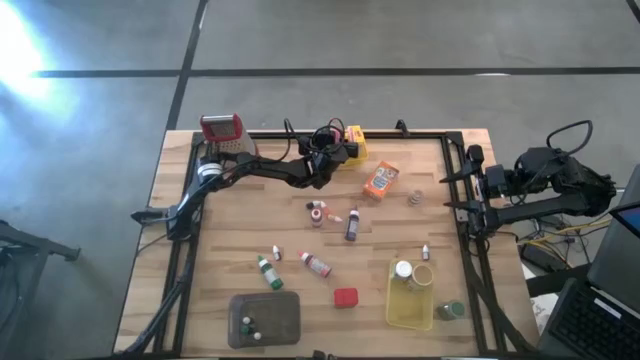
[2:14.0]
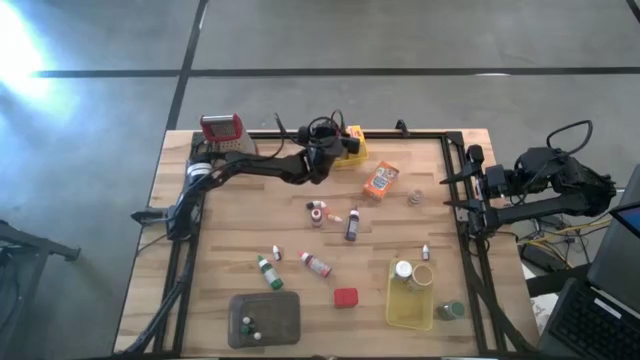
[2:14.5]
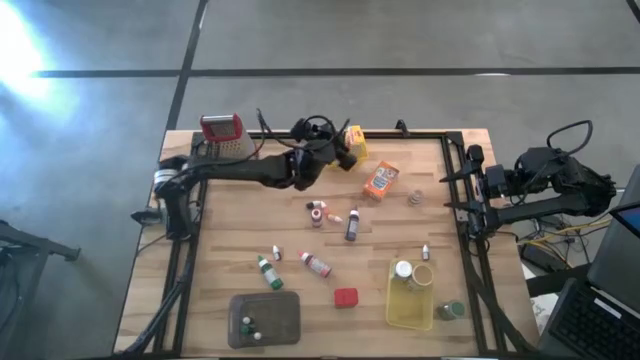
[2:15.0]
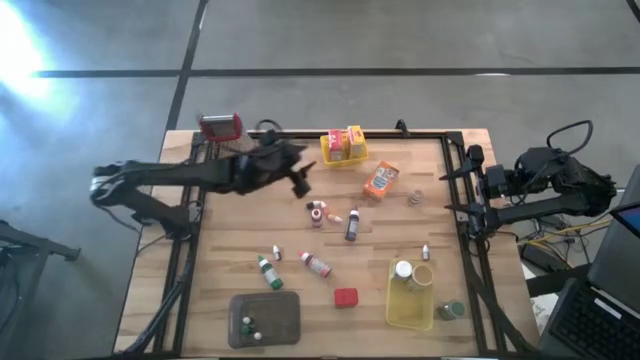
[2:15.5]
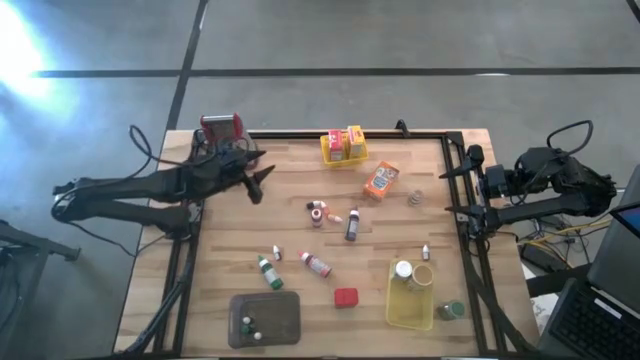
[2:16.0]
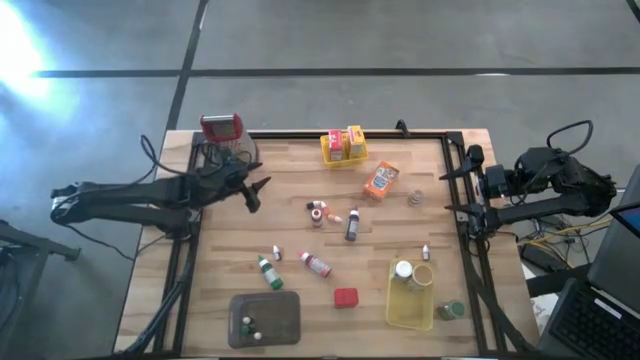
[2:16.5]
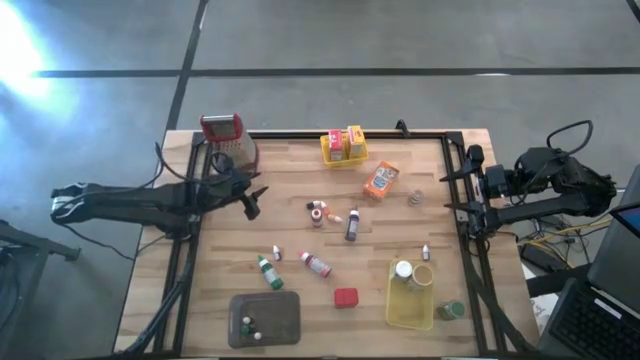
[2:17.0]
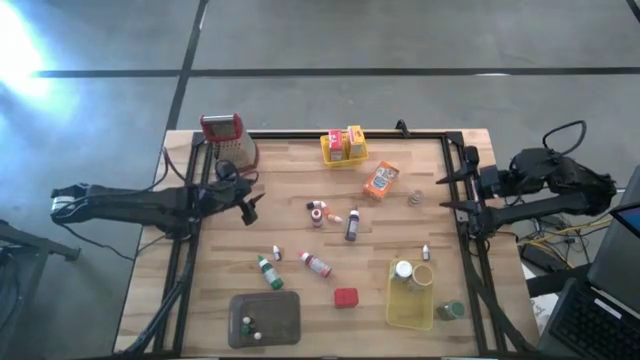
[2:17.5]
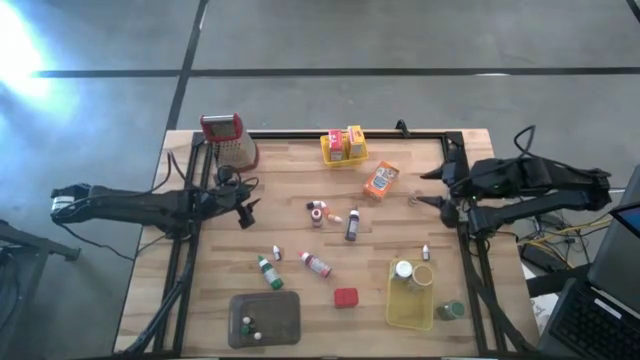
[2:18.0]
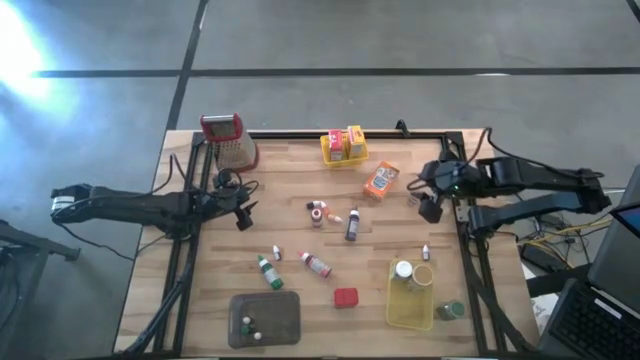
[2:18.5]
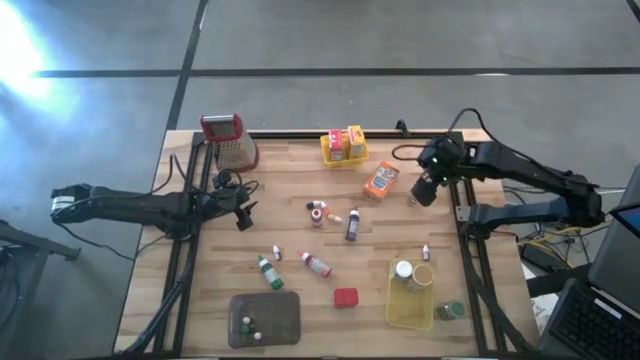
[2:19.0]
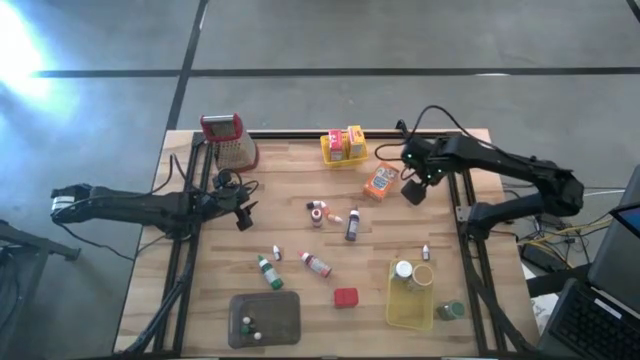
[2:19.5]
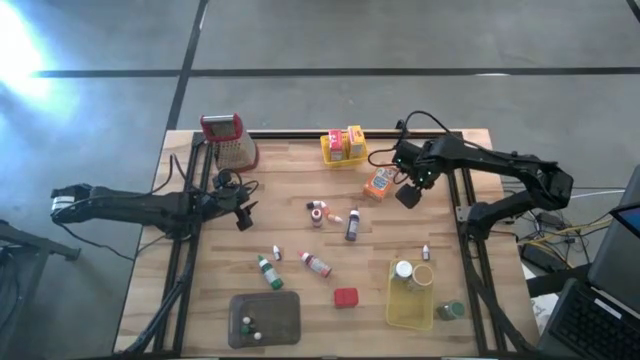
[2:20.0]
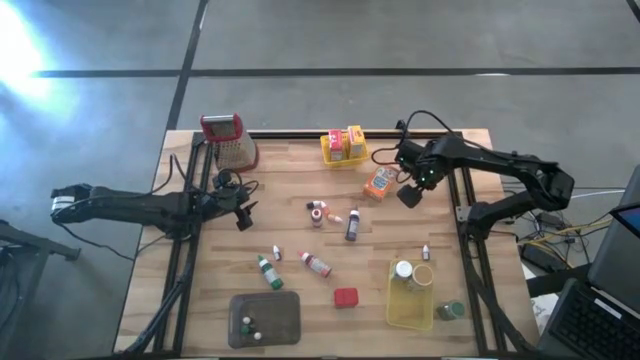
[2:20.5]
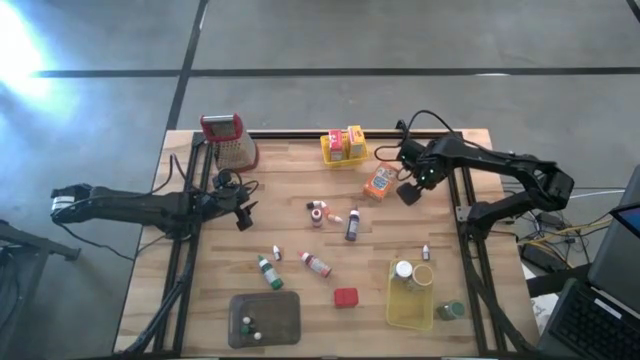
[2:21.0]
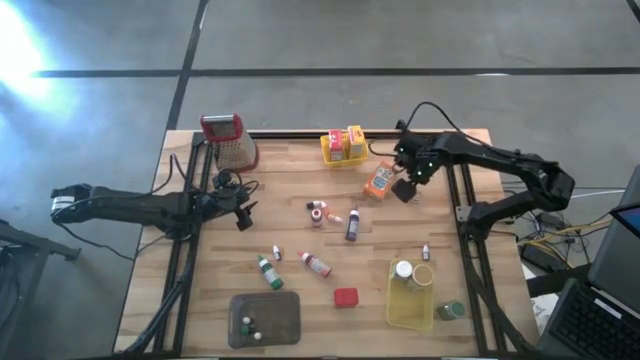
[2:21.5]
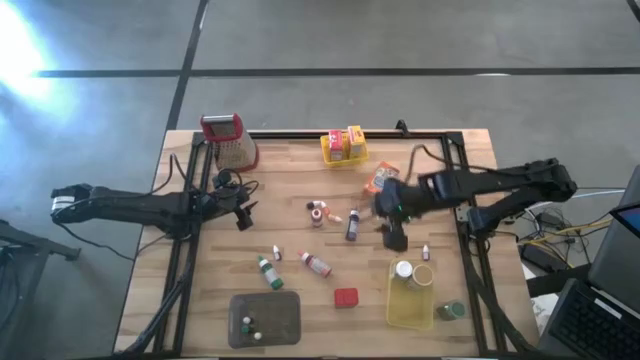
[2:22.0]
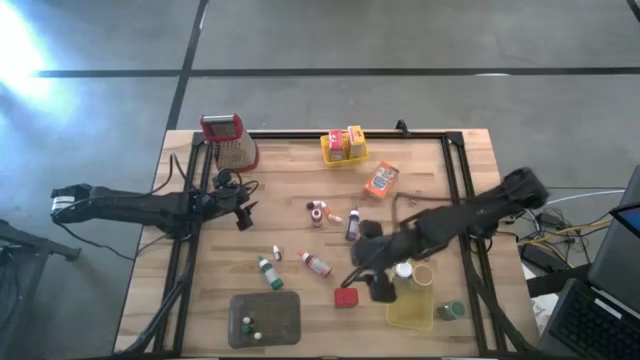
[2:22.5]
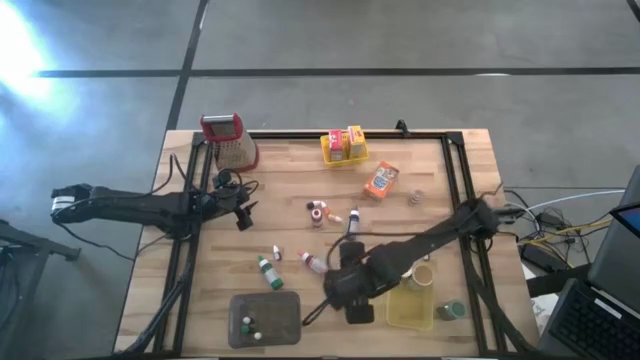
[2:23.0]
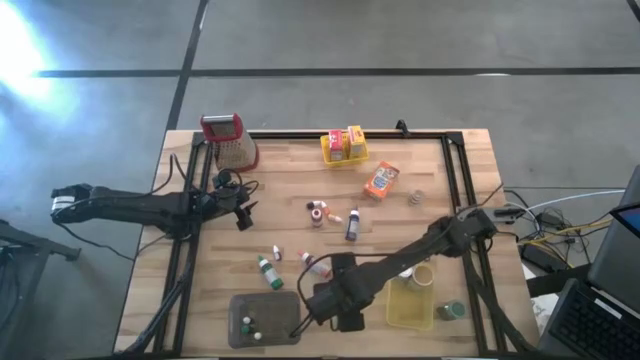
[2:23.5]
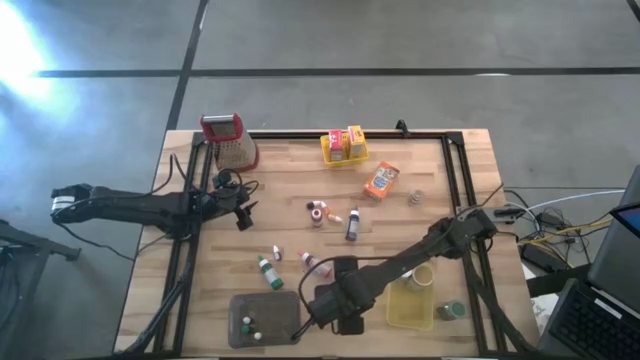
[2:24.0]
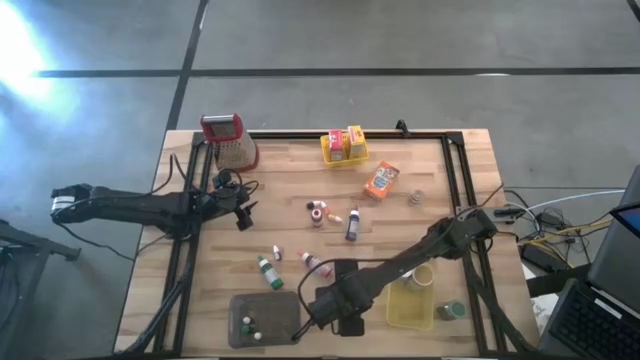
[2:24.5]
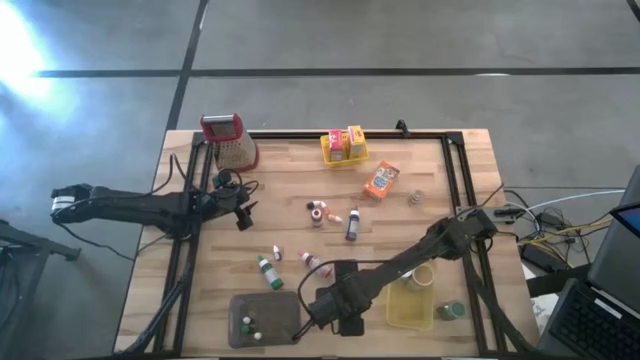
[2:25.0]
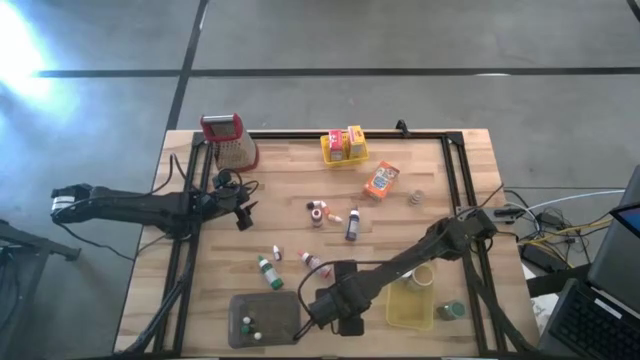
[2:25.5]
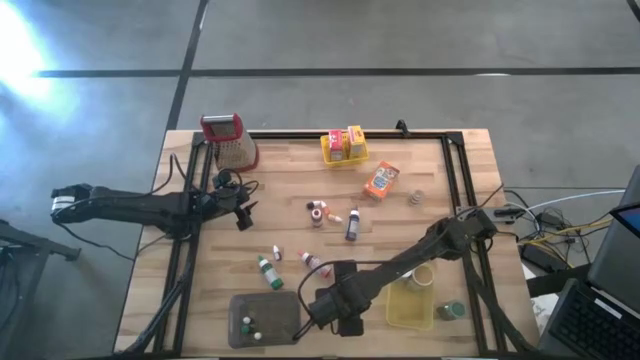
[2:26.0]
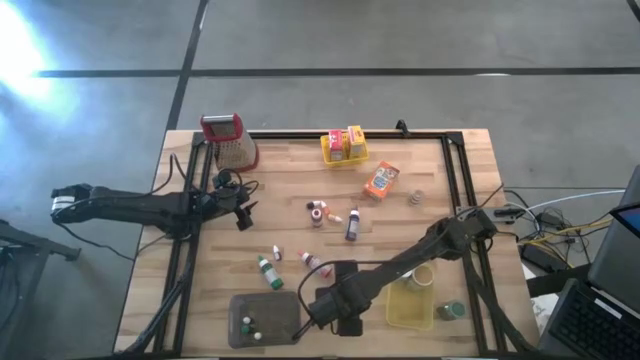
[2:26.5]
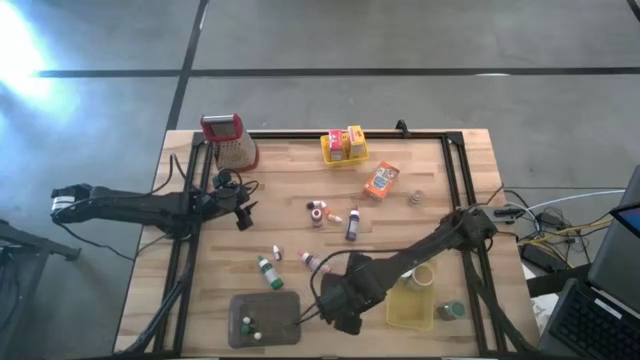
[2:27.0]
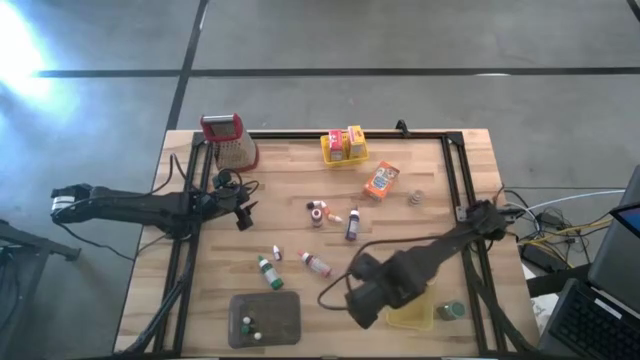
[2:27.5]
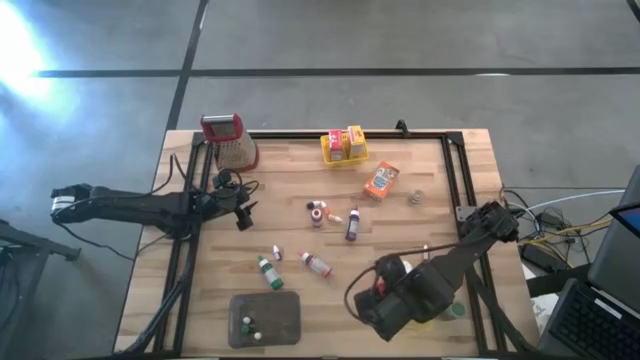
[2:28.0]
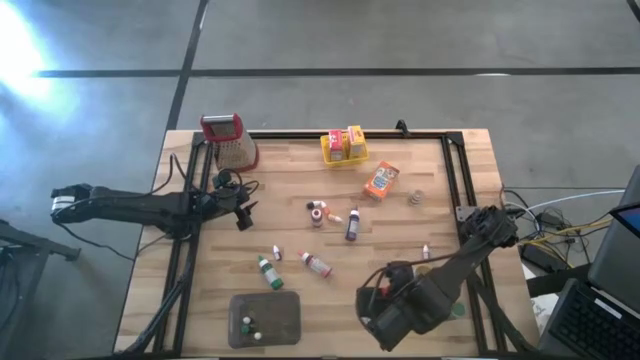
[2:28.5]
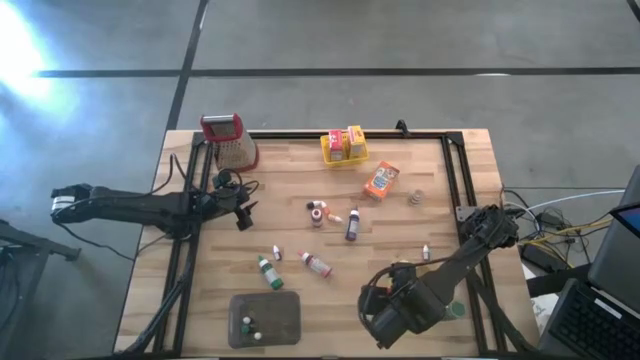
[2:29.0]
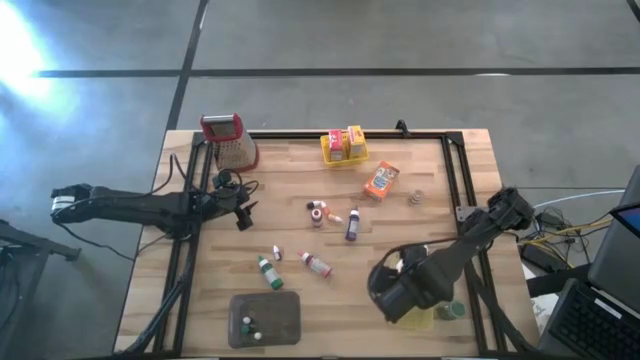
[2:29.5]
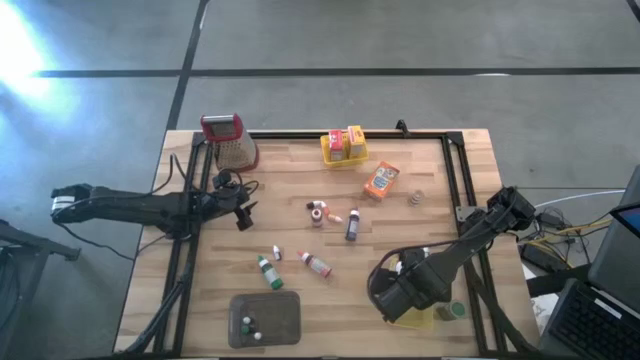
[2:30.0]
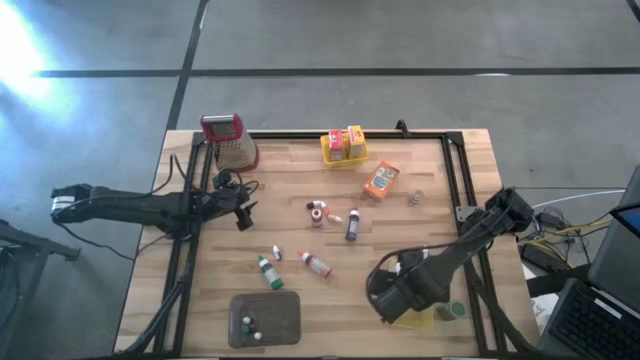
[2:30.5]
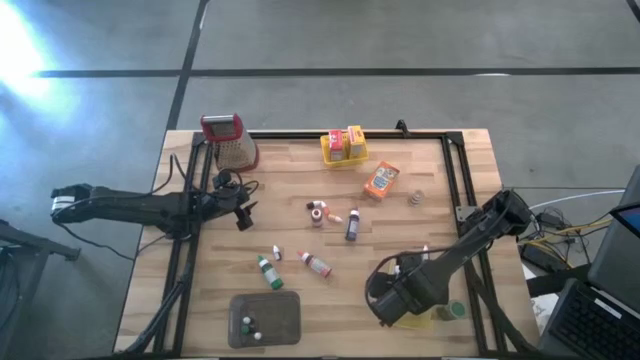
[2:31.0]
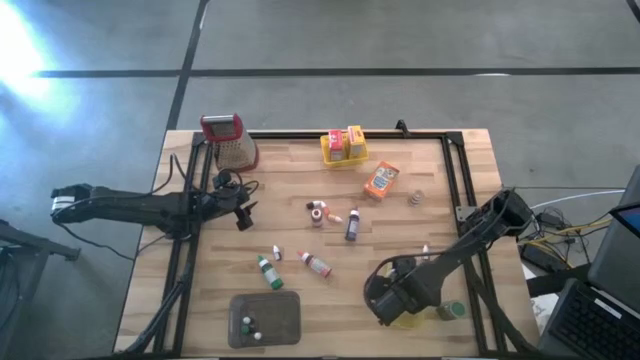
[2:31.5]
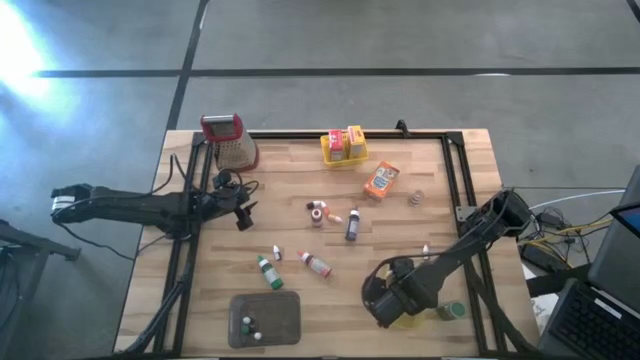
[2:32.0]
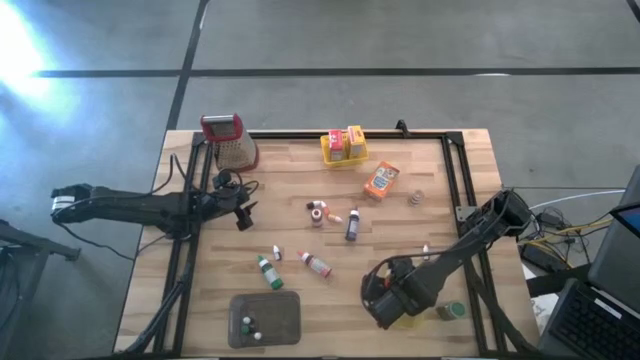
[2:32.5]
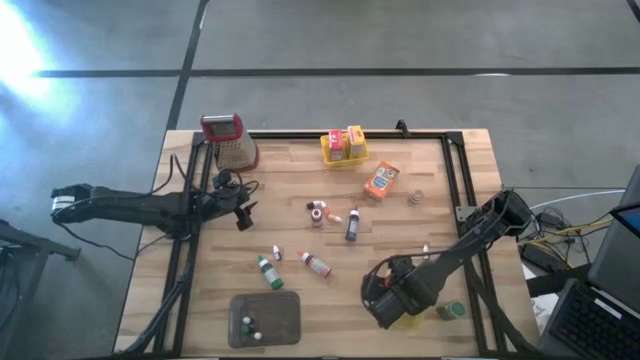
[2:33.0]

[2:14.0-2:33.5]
Task: Pick & Place Kitchen Items
Put the red seasoning can into the bottom yellow bin

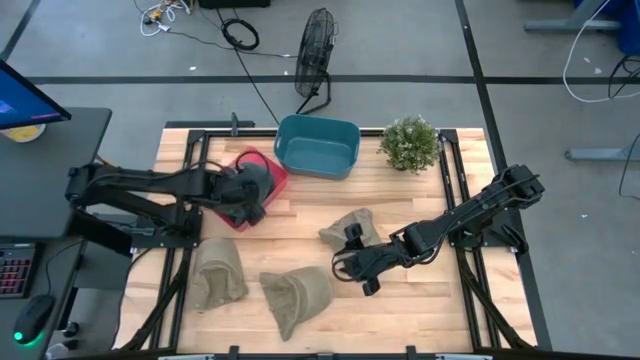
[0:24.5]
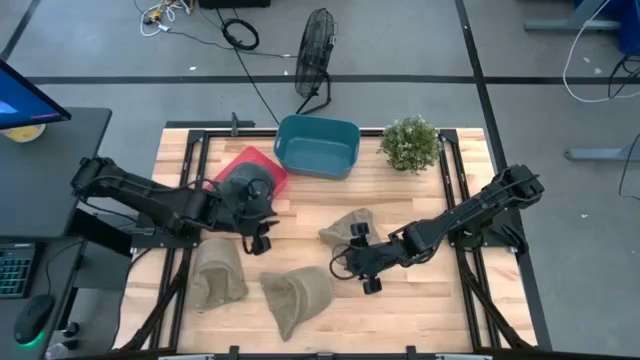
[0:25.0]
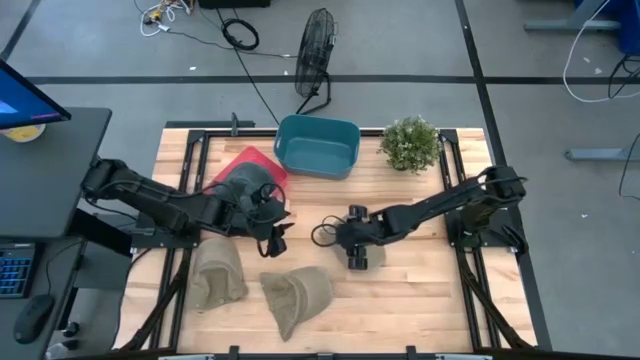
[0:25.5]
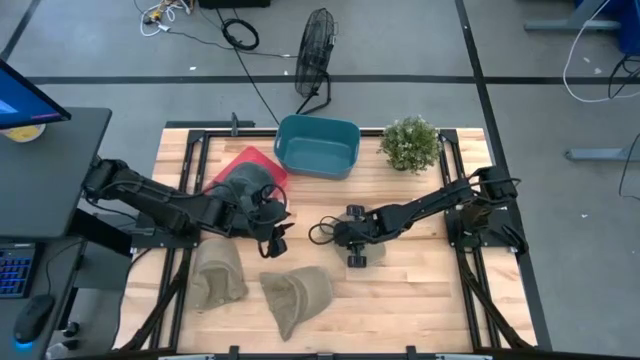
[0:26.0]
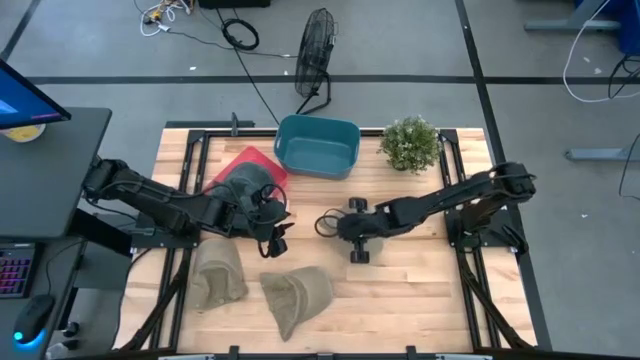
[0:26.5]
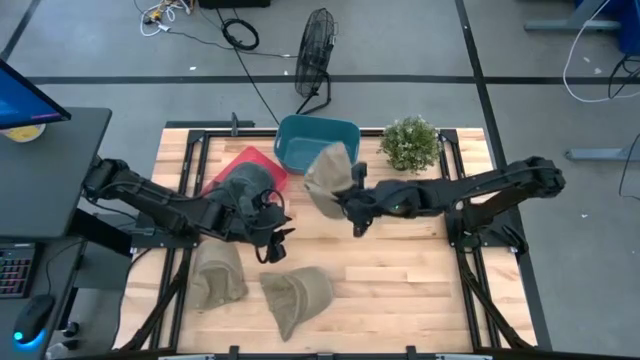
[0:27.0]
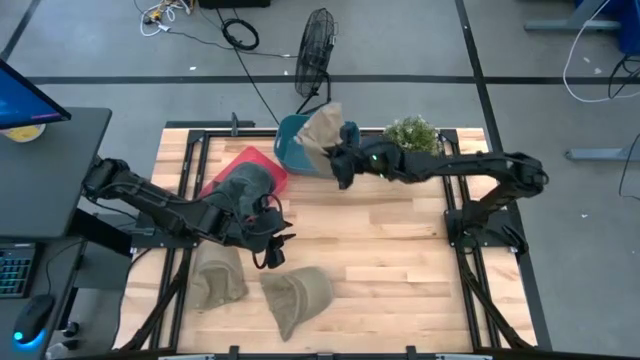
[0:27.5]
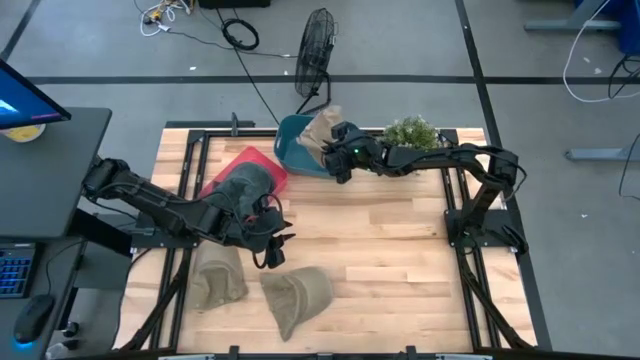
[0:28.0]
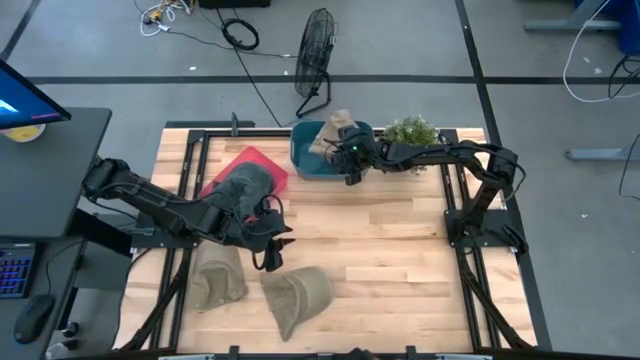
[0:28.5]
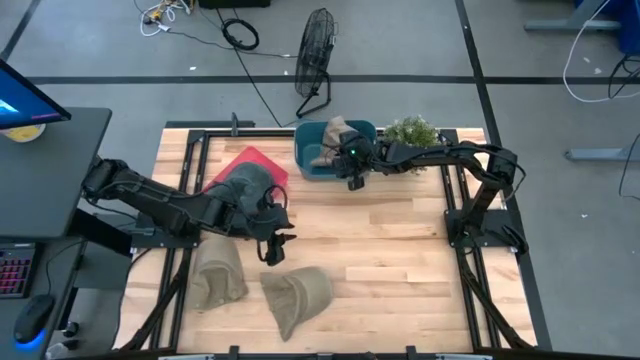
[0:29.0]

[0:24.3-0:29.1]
Task: Pick & Place hat
Put the top right brown cap into the blue bin
